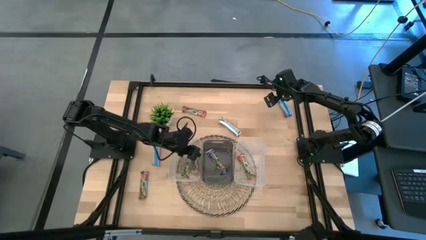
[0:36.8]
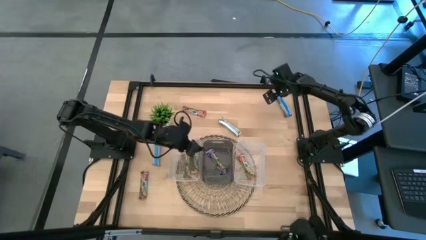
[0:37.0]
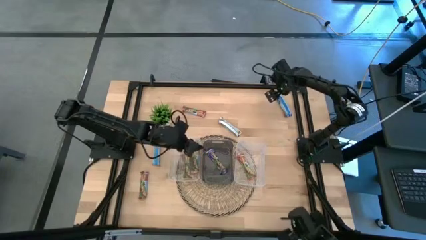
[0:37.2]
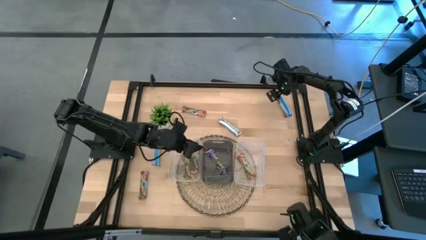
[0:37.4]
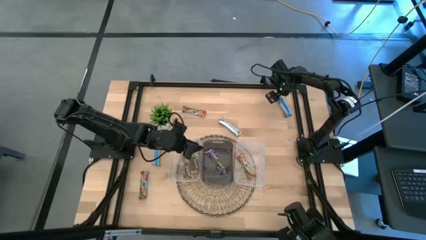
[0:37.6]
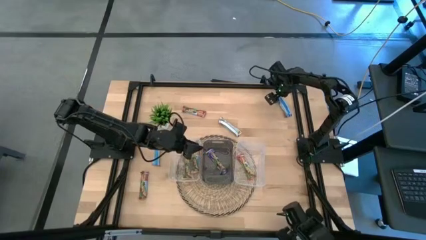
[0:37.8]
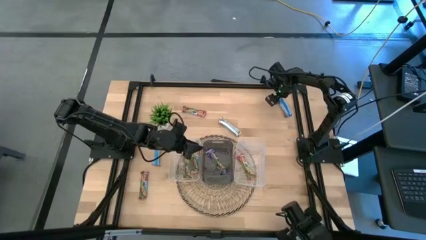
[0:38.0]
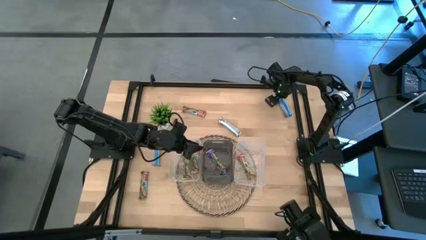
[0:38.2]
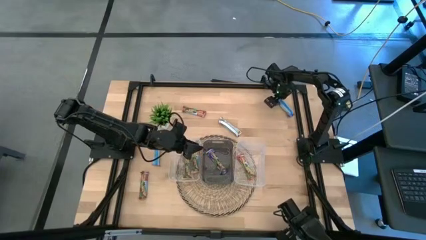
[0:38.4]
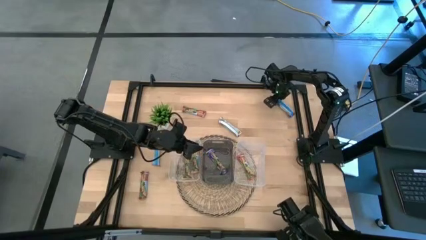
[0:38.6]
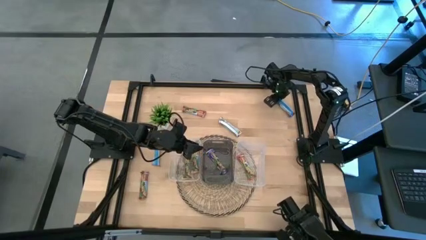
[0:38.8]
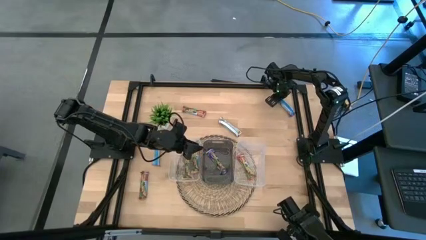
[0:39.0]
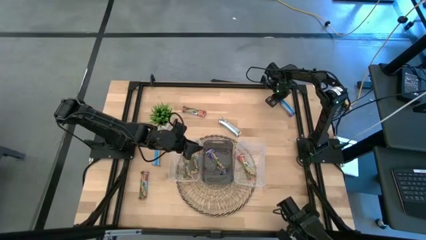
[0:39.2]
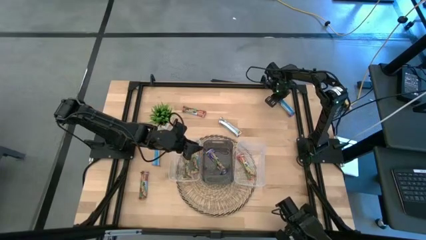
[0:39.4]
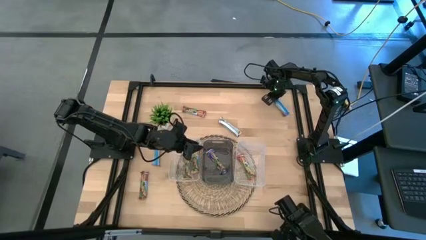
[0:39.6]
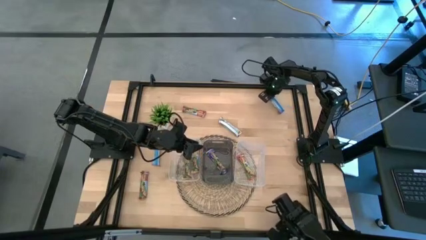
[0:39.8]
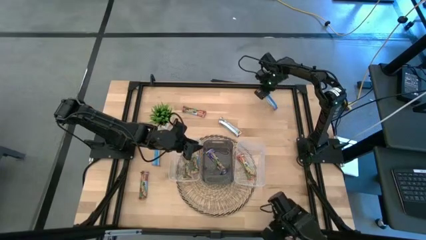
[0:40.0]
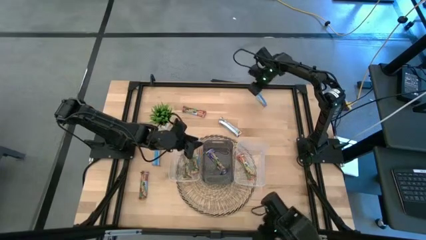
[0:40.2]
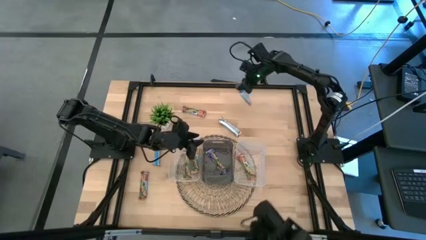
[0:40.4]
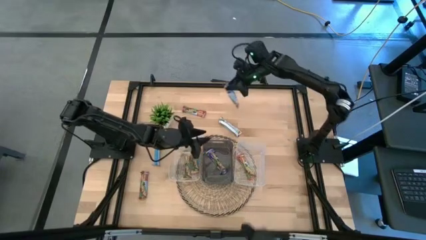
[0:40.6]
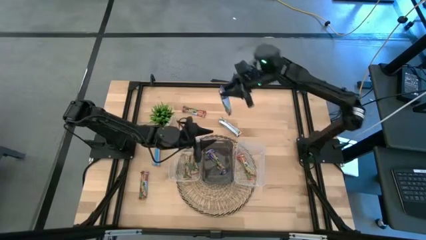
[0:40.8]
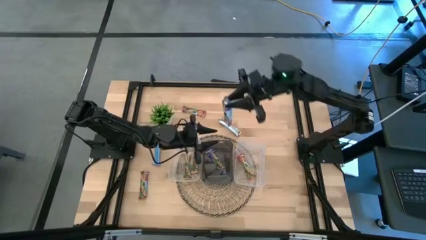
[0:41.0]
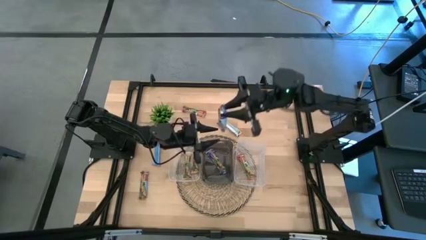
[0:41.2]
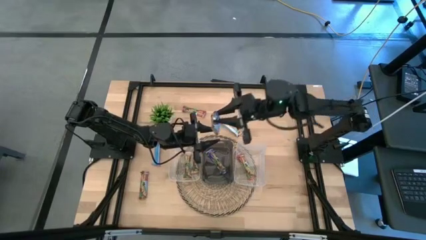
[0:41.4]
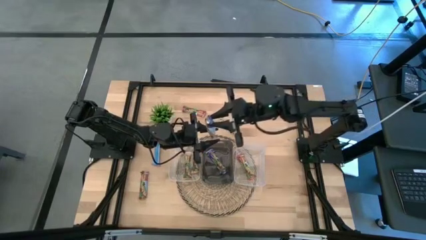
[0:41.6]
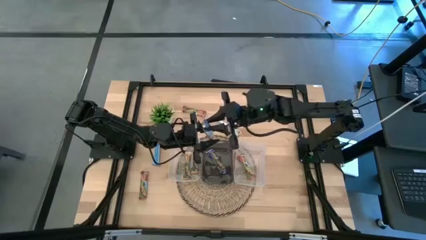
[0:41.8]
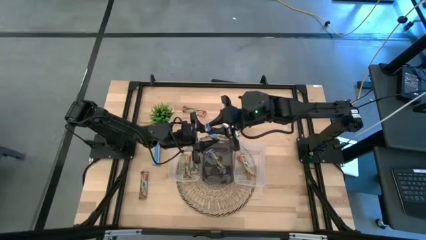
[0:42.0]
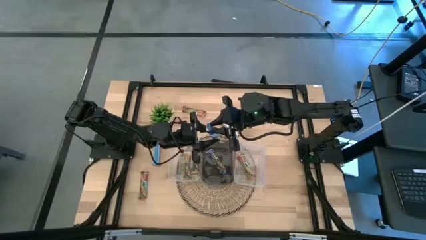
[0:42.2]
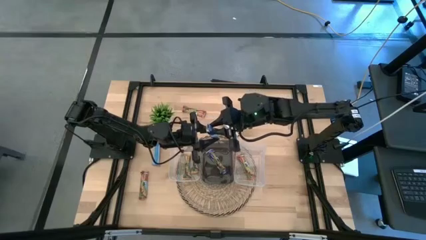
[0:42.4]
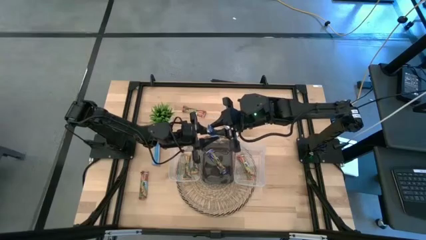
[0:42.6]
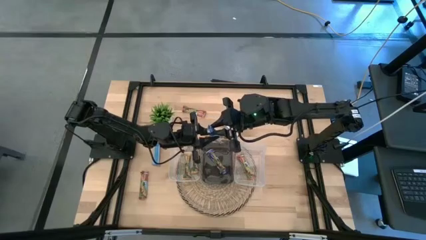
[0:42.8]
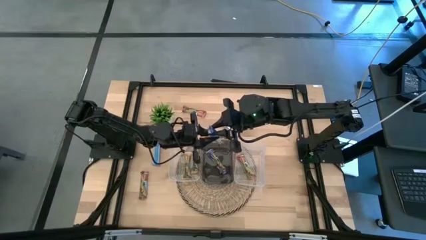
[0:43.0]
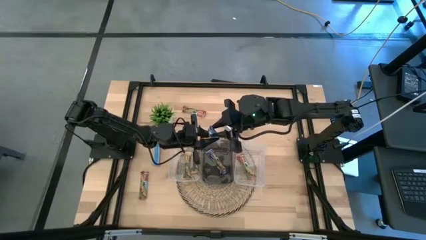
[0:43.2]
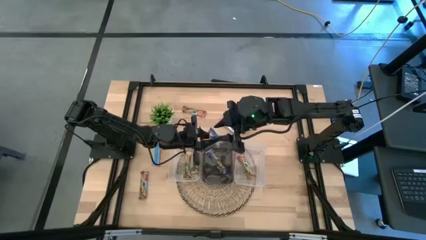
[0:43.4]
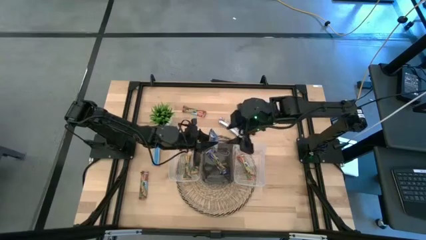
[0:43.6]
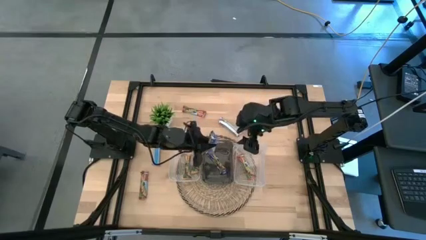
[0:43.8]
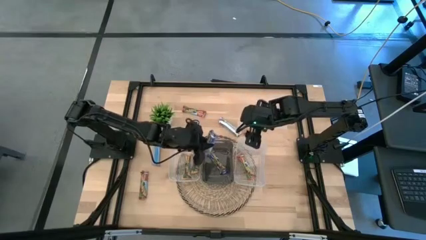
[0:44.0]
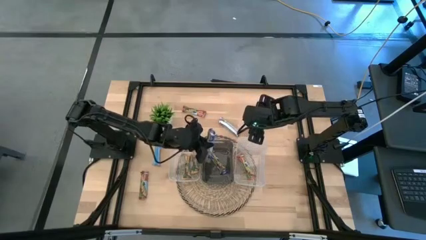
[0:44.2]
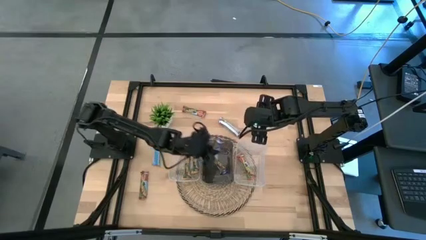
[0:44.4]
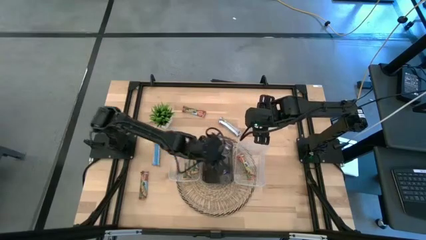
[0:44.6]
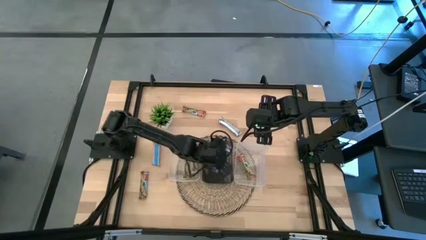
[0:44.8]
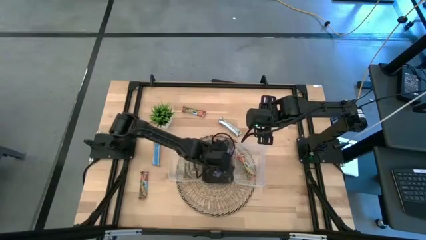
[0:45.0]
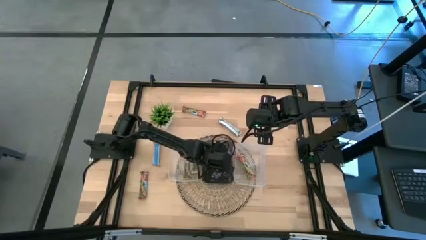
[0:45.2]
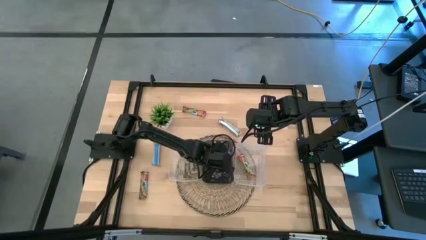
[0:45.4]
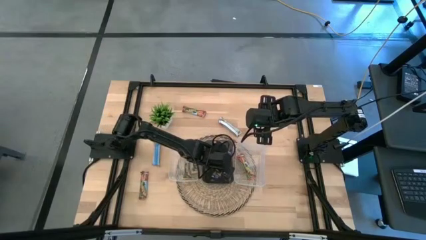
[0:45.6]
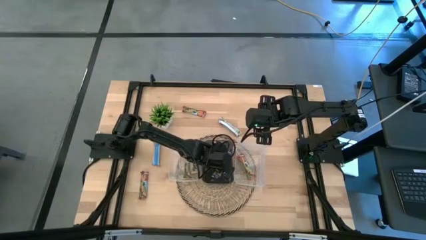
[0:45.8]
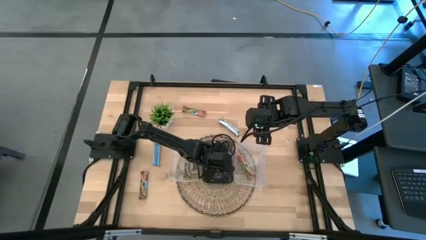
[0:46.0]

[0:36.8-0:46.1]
Task: Pick and place Granola Bars by type
Put the blue granola bar into the black bin

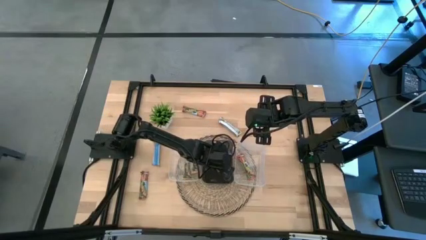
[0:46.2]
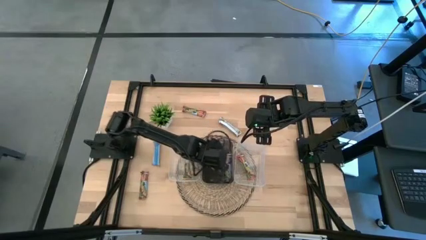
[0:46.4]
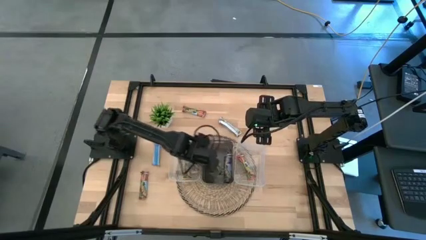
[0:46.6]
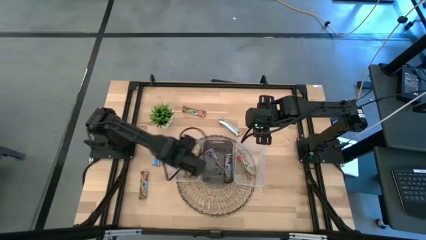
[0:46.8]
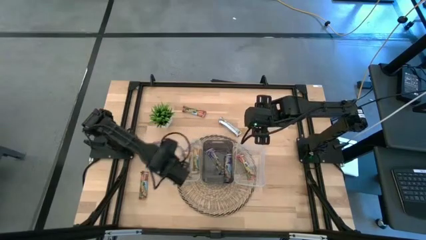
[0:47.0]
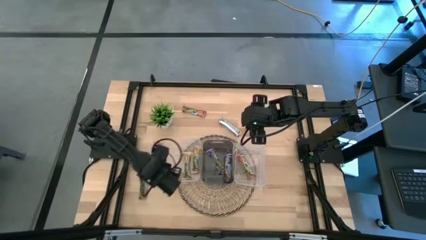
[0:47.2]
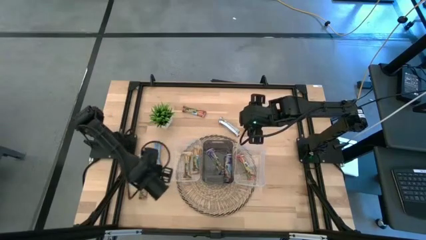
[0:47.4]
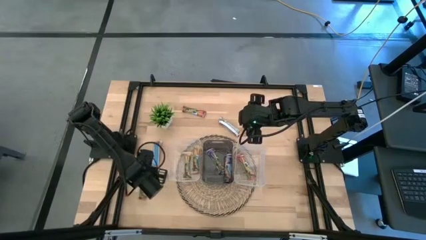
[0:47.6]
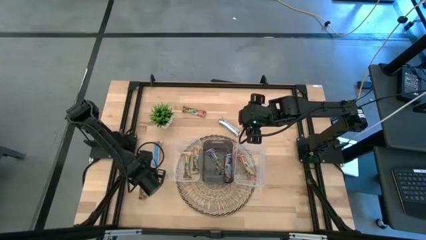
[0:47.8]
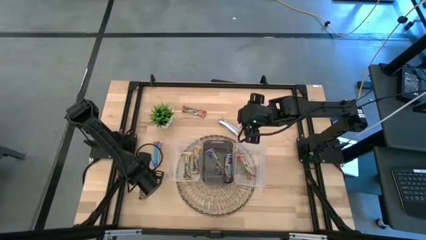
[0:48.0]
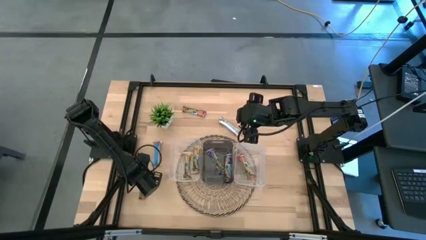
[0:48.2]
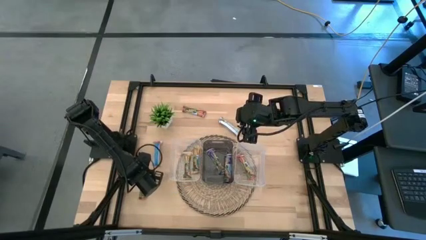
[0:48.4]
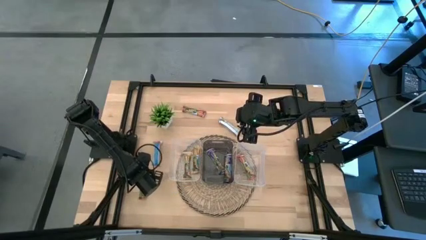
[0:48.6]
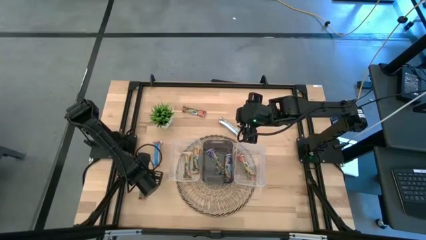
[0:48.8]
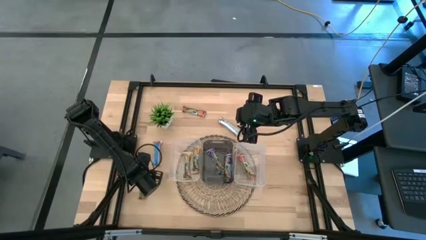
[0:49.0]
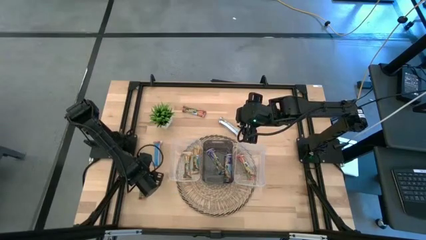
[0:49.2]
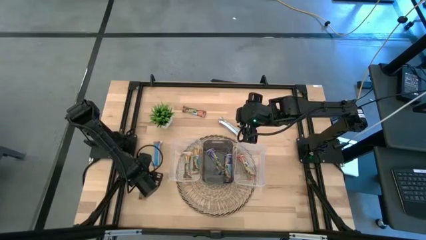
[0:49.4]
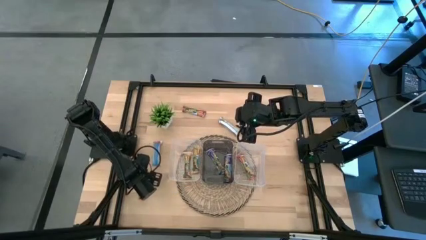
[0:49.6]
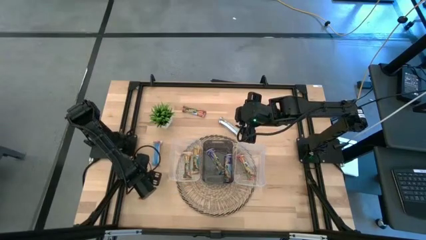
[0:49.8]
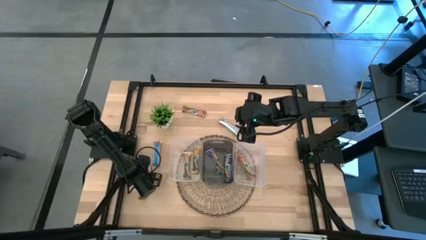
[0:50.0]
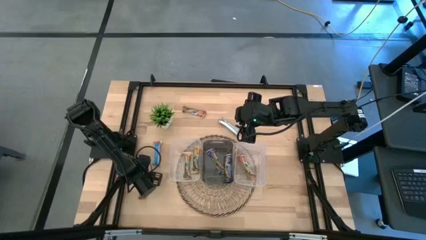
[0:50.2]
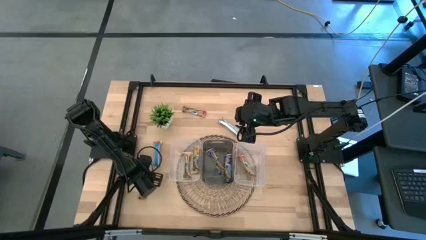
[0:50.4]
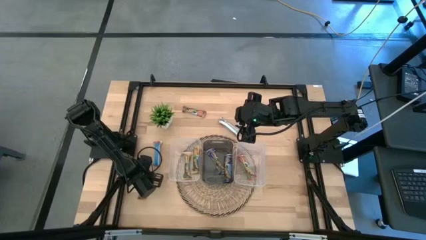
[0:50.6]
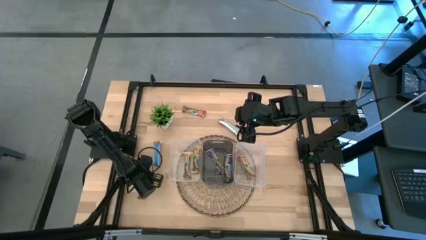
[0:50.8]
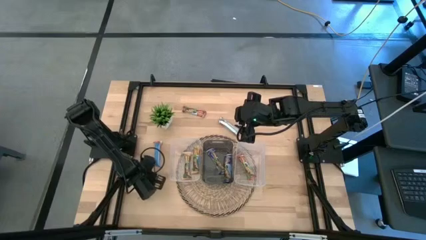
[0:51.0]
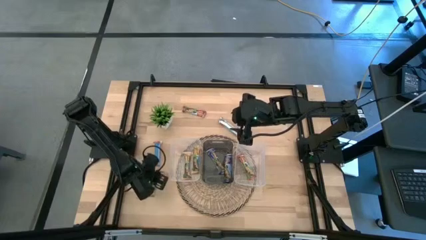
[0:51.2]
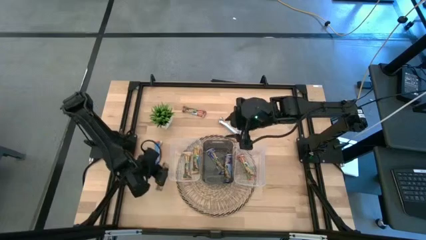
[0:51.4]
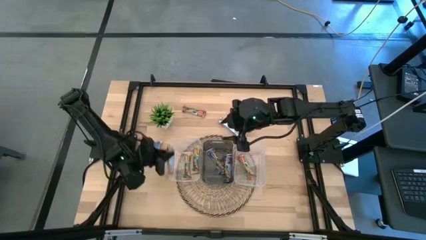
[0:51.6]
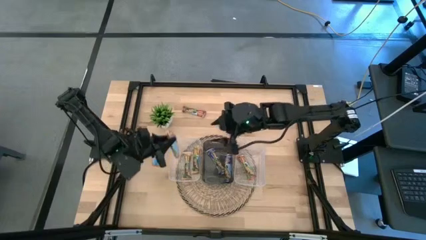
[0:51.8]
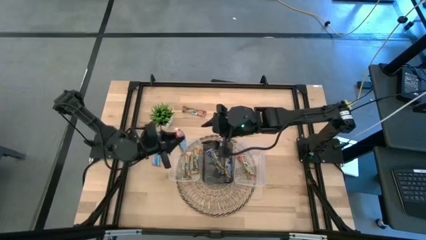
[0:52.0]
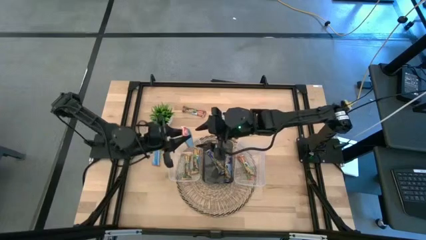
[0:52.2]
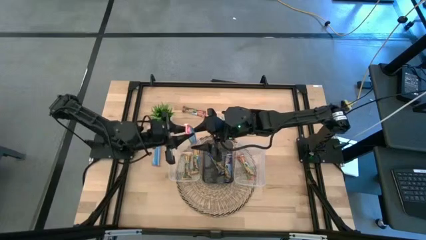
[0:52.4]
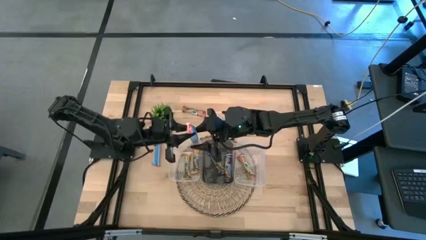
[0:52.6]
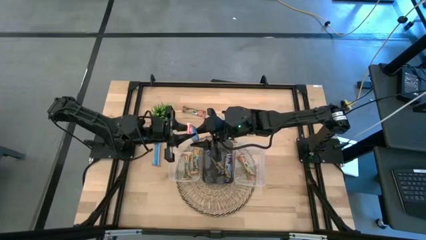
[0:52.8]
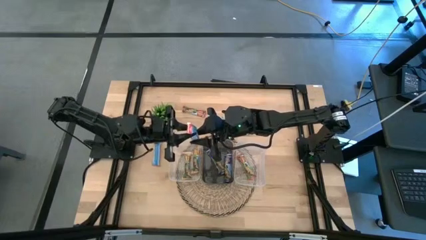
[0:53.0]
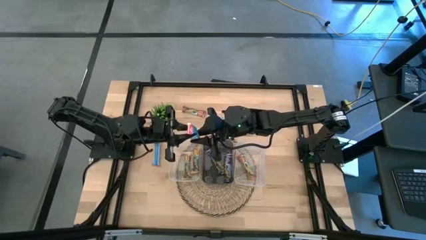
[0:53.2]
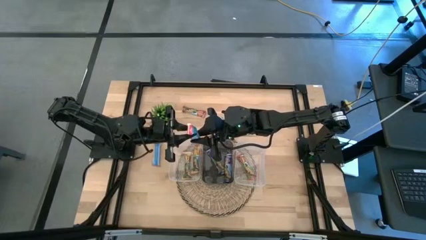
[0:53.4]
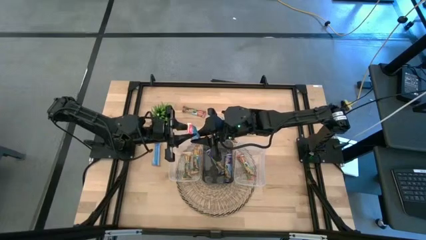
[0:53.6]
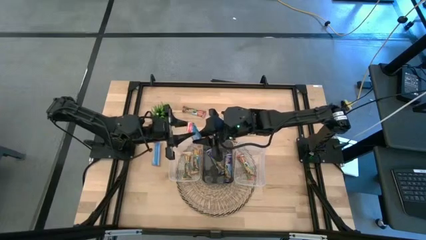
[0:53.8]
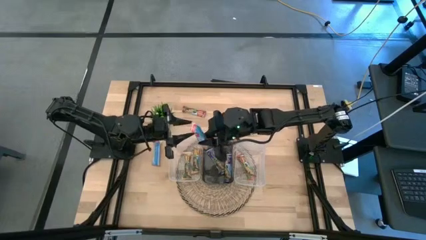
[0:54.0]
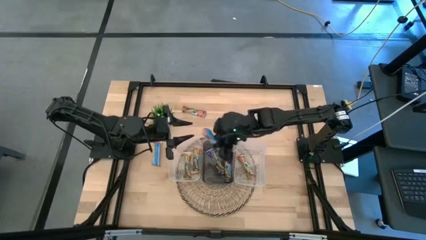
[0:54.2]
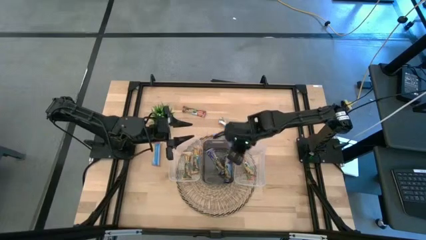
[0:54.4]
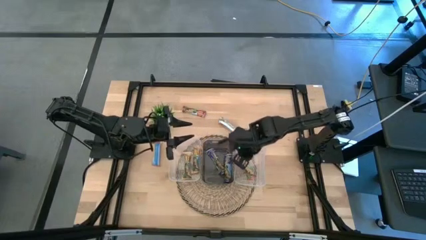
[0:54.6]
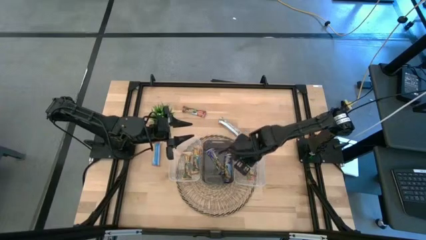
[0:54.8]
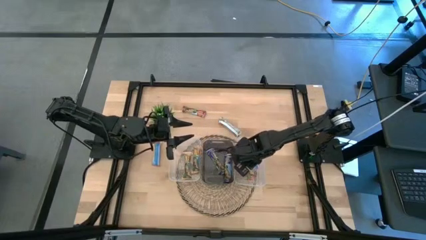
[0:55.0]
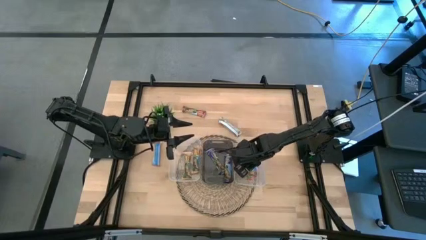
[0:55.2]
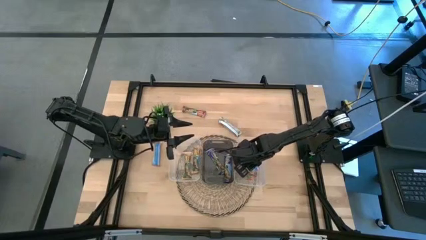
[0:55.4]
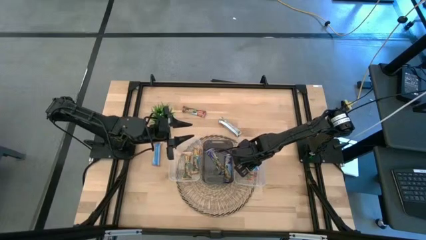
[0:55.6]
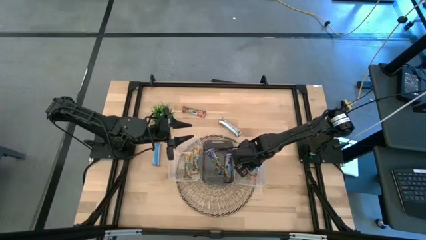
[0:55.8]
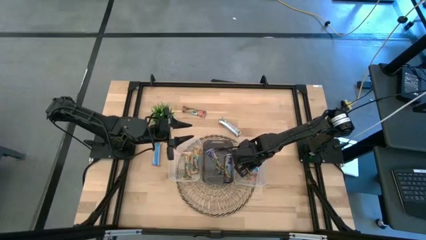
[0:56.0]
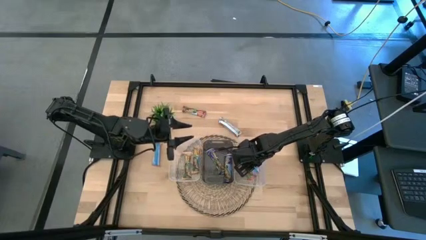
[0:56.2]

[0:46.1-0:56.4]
Put the red granola bar into the right transparent bin
